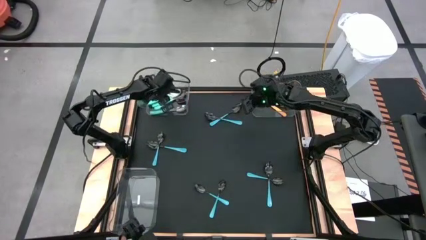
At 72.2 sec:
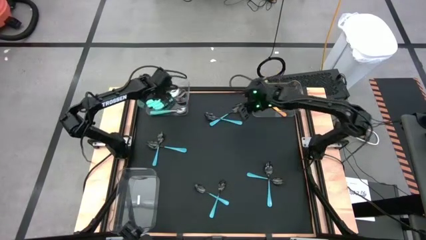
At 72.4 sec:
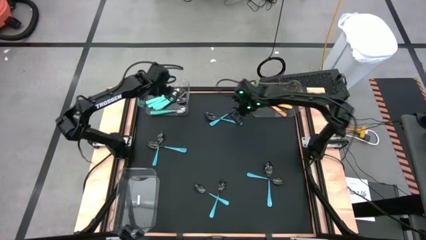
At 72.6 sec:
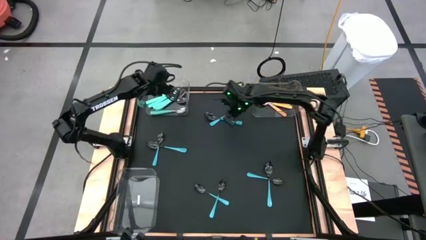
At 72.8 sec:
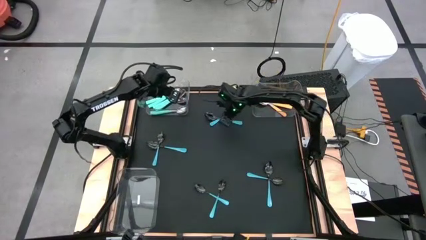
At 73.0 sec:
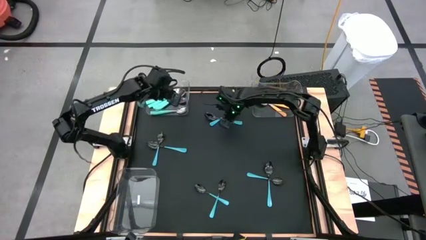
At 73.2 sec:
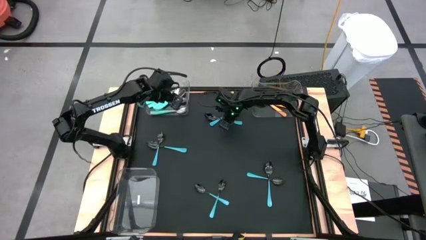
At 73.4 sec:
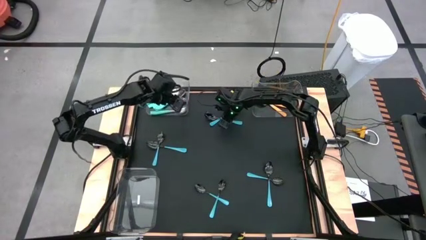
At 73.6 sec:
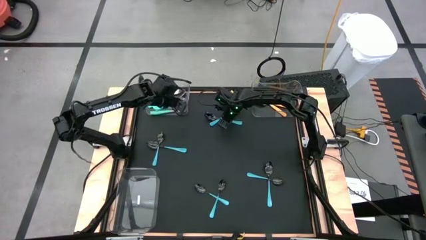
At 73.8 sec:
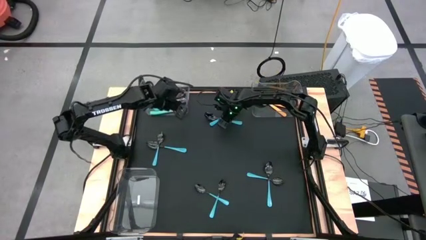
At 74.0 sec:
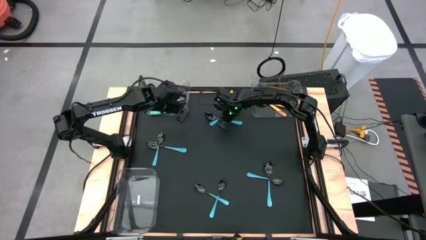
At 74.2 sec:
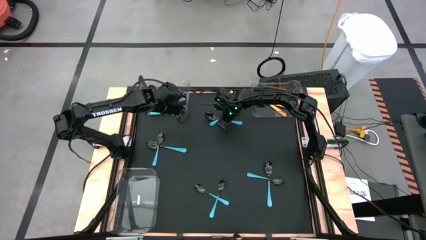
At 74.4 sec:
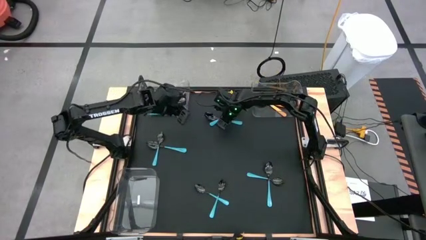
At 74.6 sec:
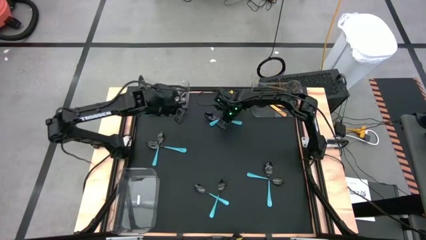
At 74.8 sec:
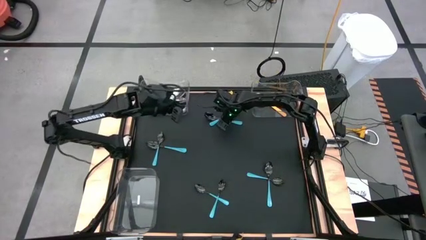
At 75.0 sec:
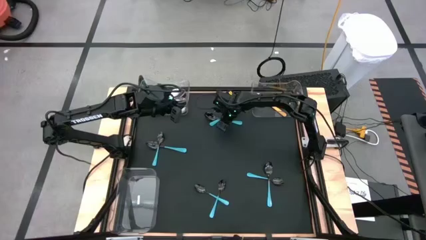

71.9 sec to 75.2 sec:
Task: Sort silverware by color (type)
Put the blue spoon into the bottom transparent bin

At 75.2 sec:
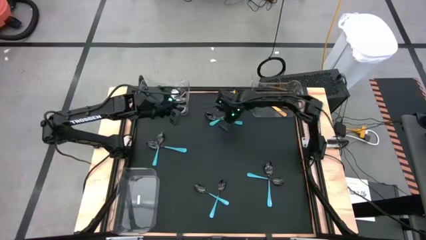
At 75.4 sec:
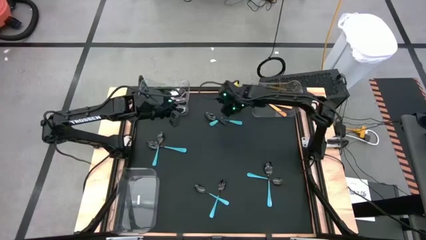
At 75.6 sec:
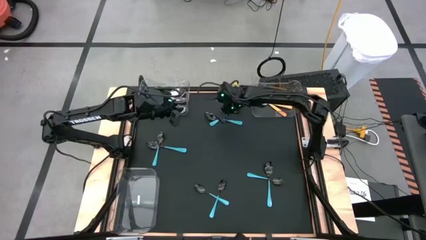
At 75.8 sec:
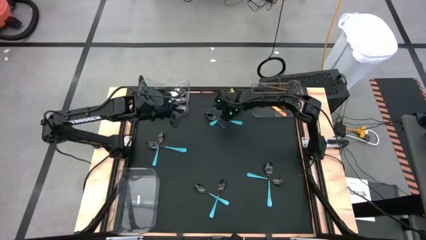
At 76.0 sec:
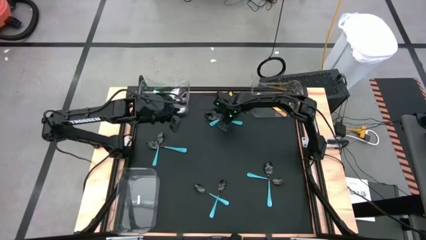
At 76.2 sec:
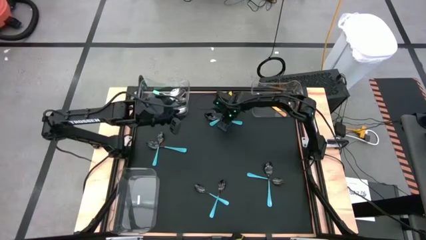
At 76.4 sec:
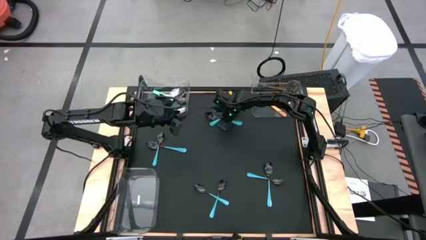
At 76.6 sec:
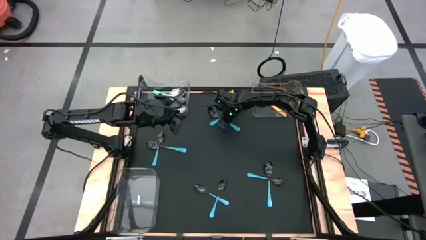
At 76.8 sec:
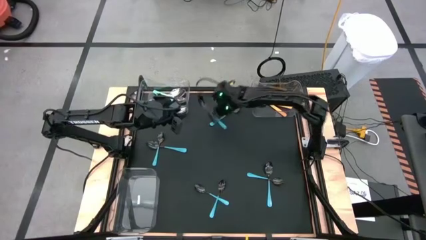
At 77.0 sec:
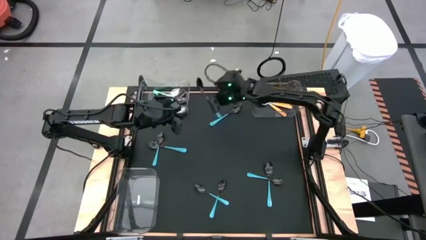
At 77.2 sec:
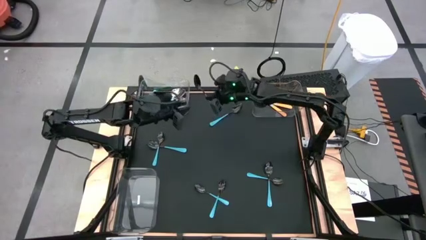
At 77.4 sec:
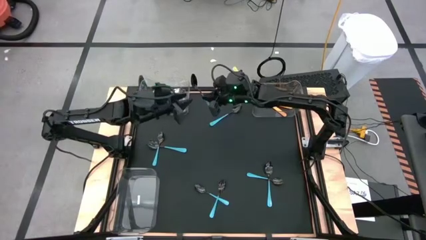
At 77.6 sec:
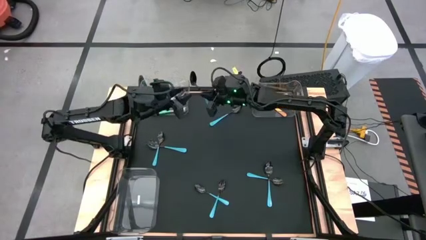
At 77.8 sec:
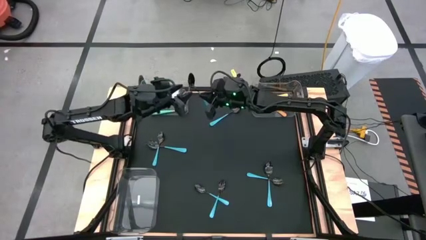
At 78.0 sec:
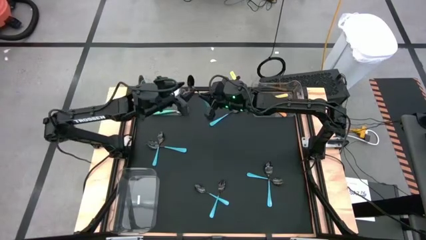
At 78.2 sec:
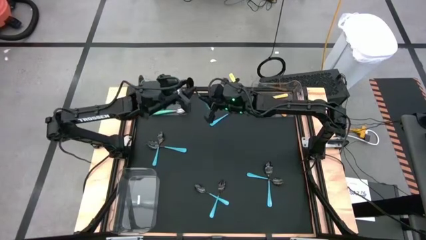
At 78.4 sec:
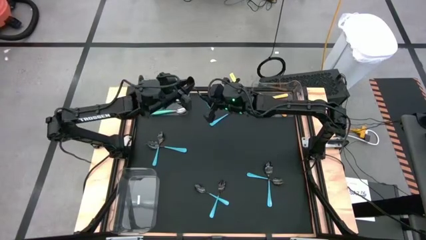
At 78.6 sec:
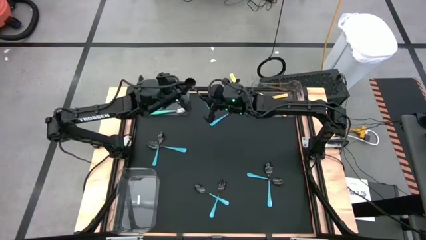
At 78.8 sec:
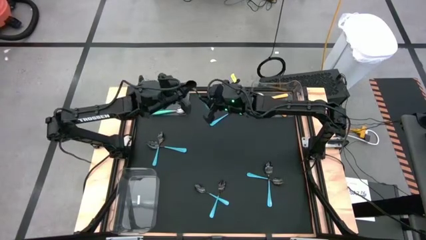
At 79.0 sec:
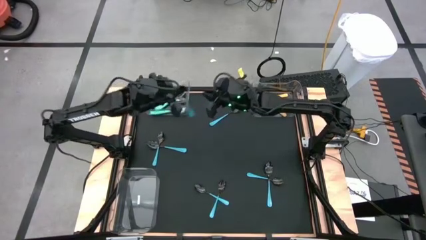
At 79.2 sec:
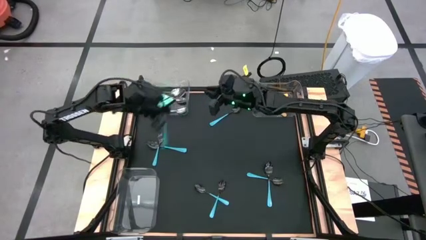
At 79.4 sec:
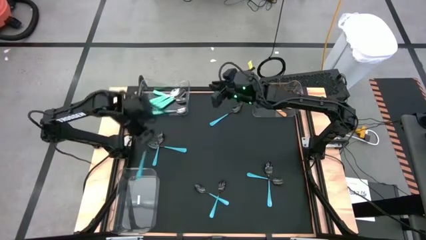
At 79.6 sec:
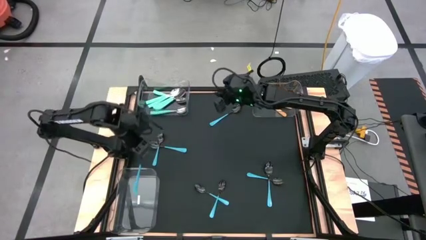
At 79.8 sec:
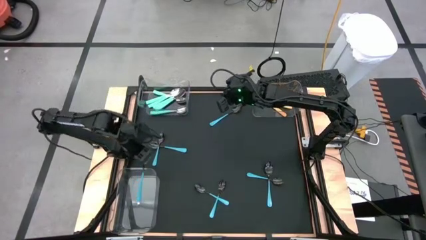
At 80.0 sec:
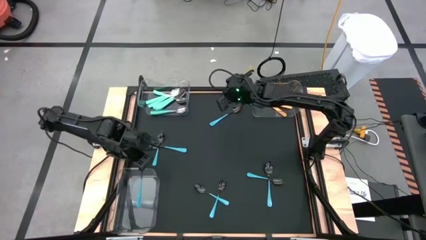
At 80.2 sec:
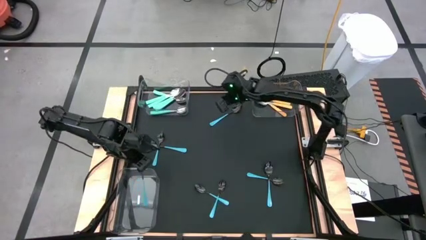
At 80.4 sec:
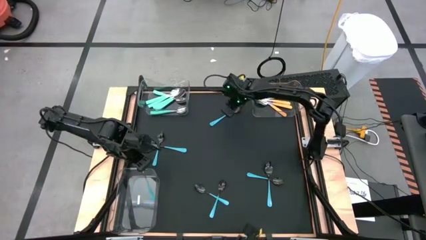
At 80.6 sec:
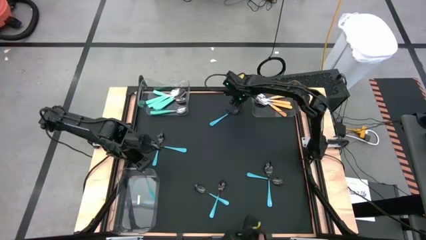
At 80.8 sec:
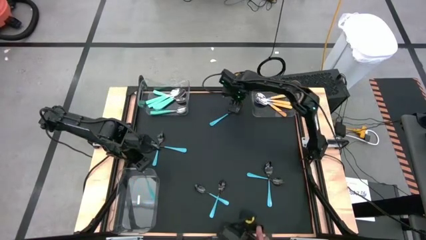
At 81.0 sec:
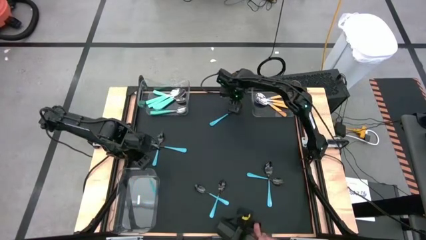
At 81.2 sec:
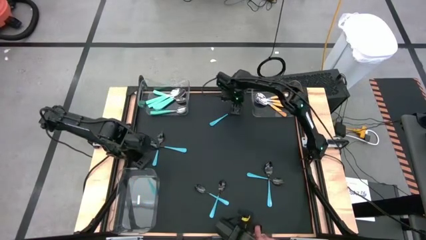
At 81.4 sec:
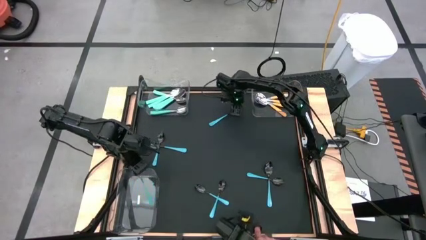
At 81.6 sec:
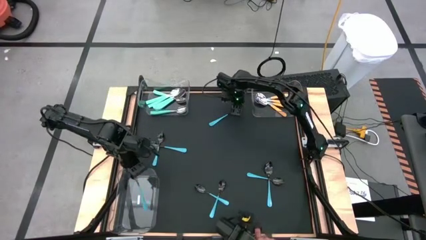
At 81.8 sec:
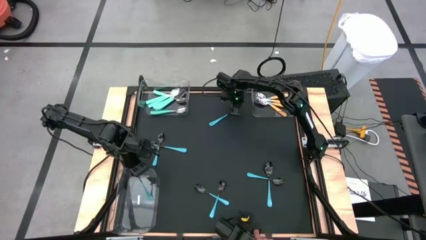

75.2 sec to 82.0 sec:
Put the blue spoon into the bottom transparent bin

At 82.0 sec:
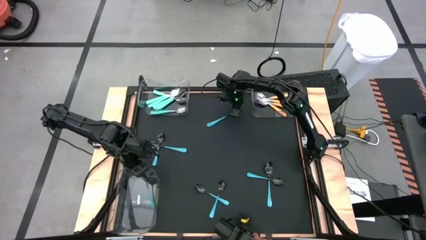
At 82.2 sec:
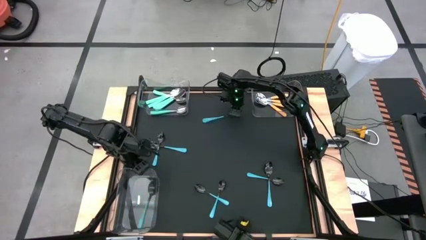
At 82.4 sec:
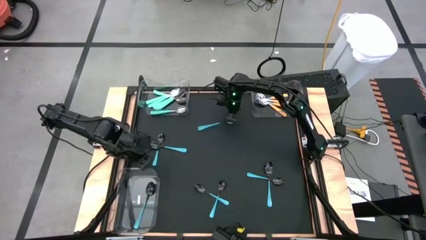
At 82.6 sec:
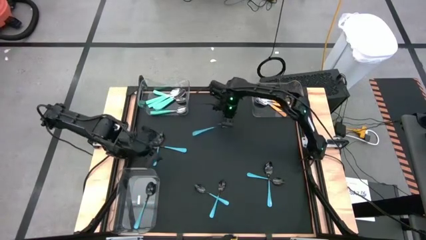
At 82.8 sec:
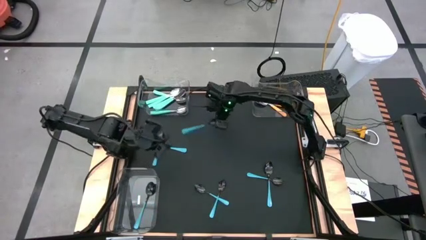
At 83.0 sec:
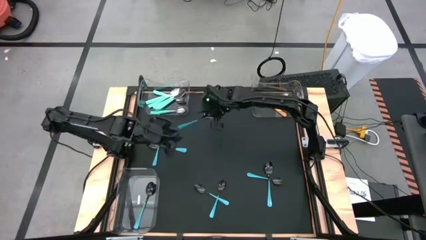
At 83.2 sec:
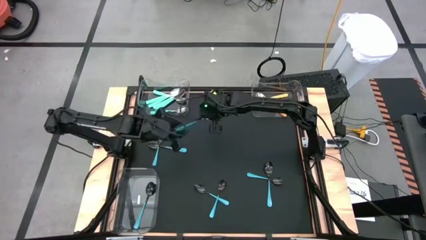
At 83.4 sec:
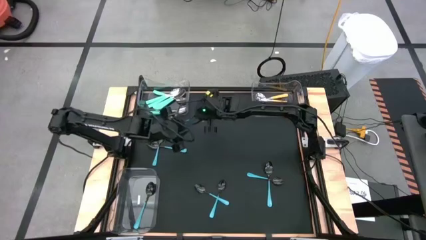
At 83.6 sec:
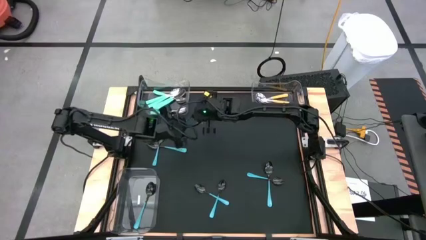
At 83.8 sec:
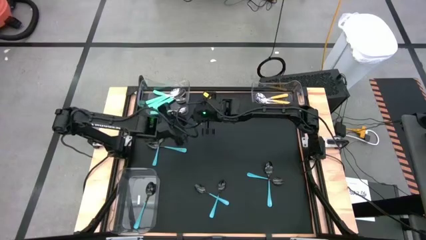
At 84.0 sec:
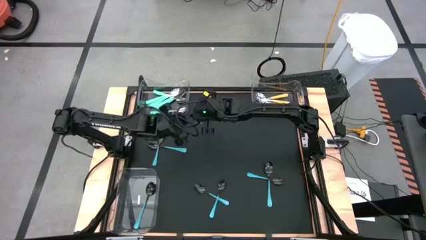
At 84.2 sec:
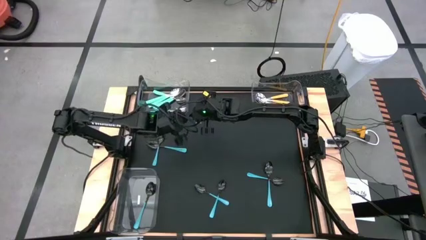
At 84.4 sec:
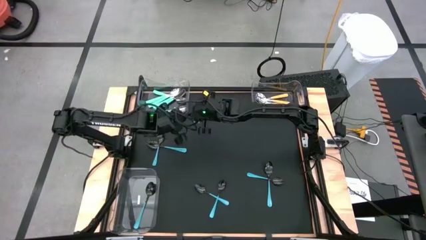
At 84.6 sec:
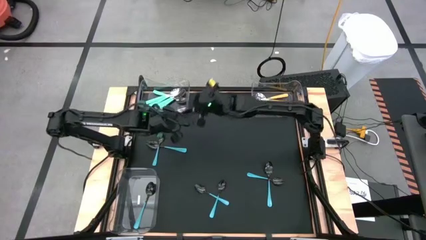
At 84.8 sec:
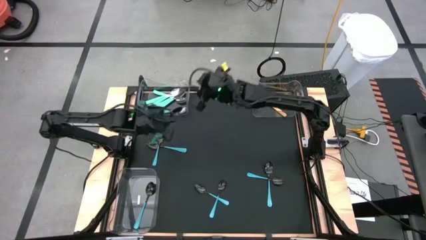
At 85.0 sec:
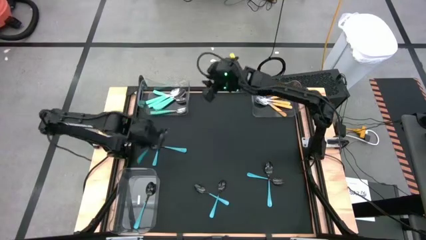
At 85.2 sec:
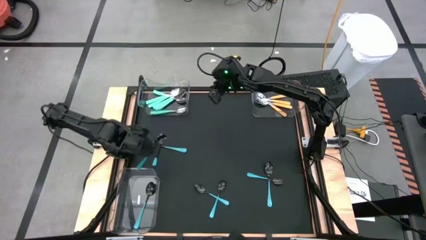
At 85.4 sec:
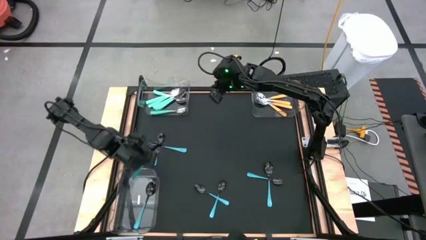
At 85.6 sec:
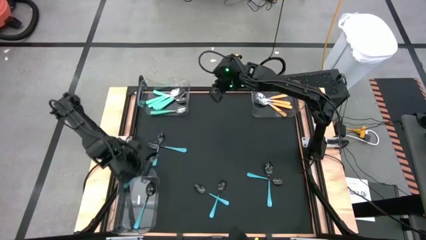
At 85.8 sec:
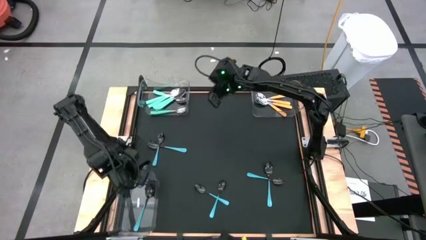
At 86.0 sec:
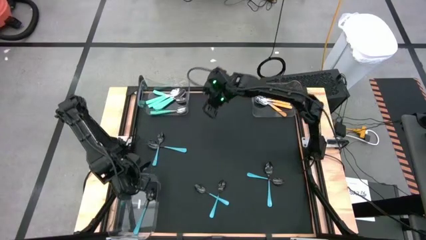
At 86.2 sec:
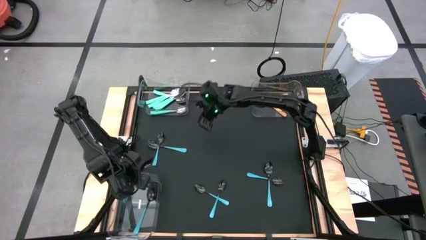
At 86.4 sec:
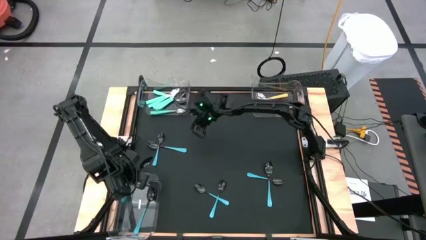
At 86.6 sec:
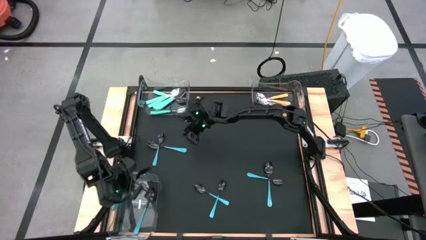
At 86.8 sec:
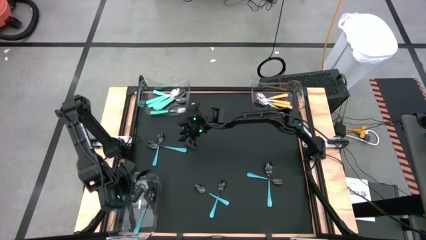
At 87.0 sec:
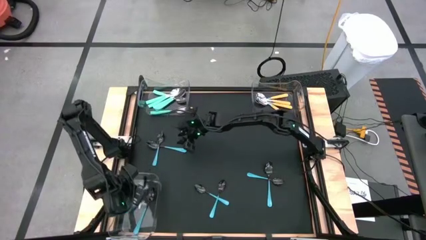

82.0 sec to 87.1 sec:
Put the blue spoon into the bottom transparent bin
